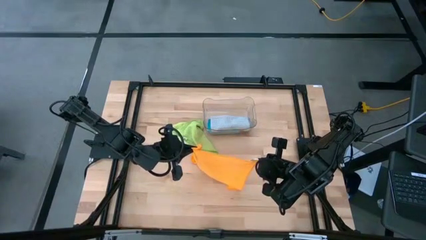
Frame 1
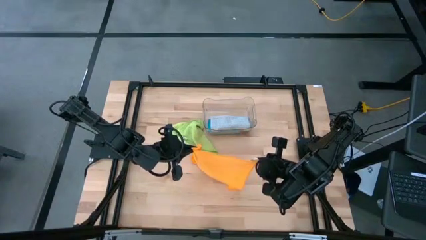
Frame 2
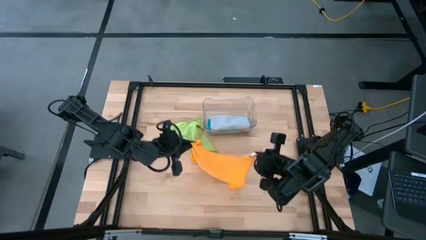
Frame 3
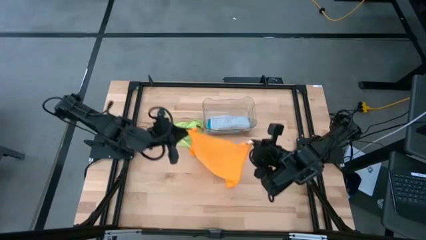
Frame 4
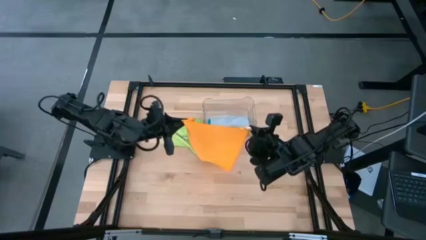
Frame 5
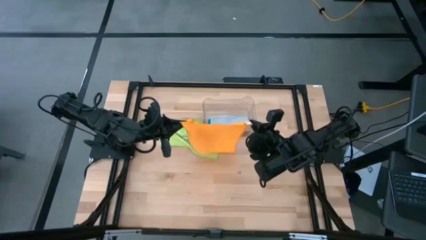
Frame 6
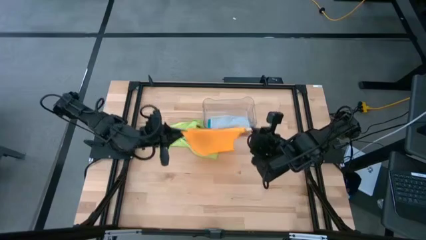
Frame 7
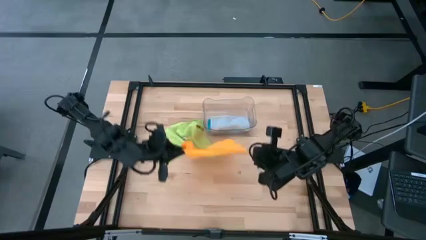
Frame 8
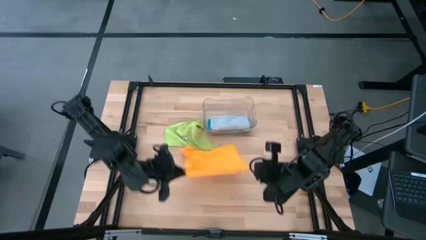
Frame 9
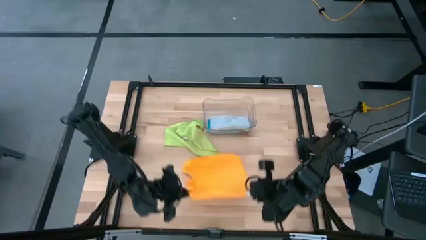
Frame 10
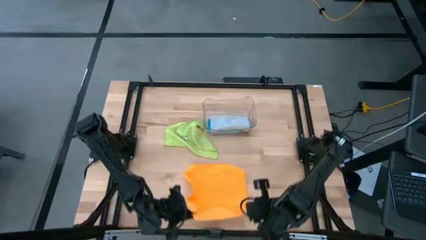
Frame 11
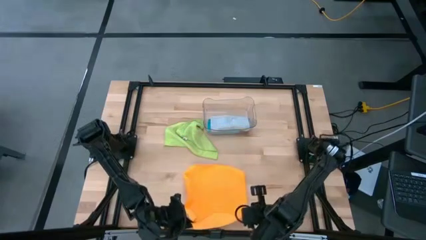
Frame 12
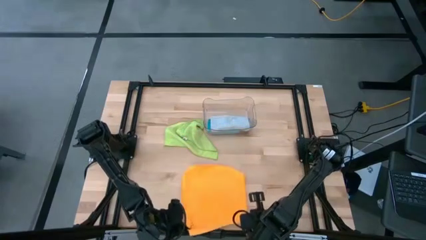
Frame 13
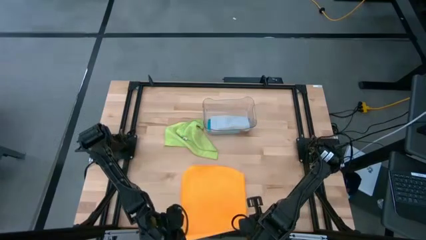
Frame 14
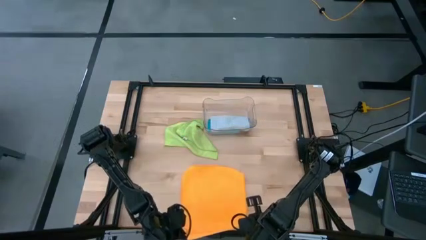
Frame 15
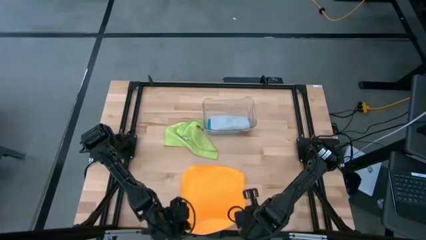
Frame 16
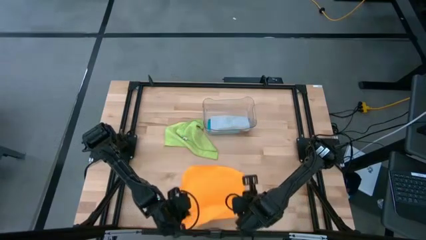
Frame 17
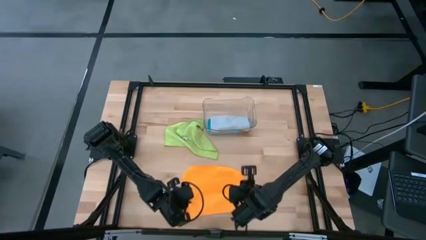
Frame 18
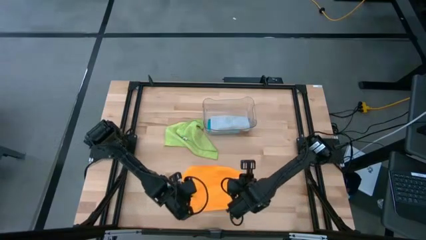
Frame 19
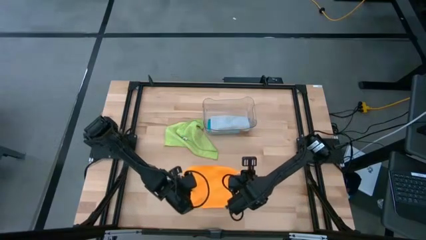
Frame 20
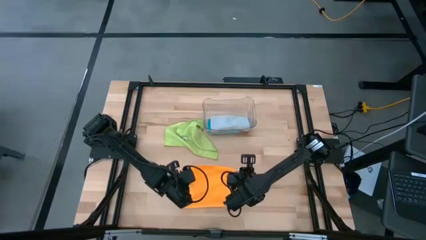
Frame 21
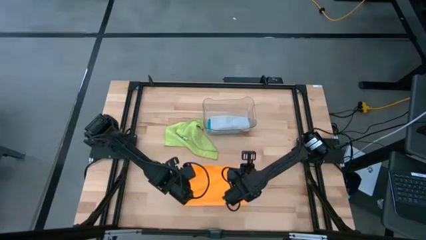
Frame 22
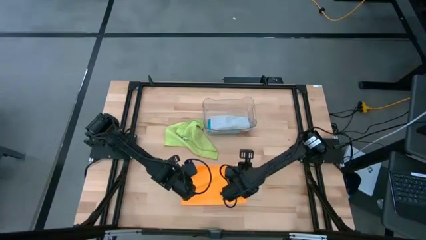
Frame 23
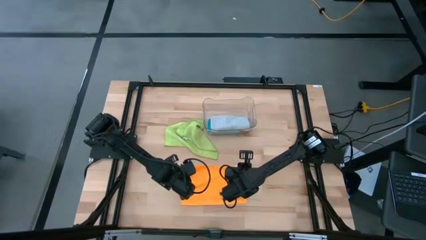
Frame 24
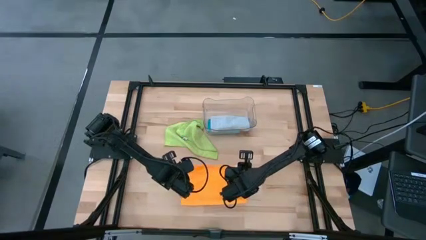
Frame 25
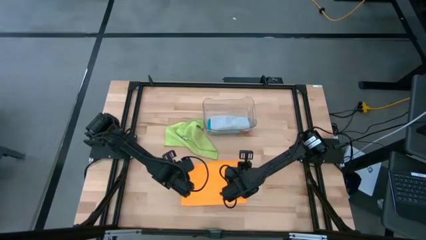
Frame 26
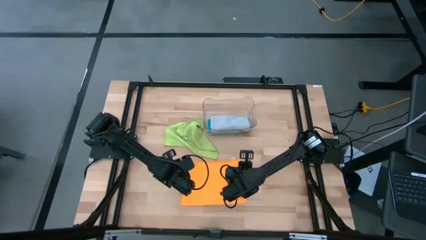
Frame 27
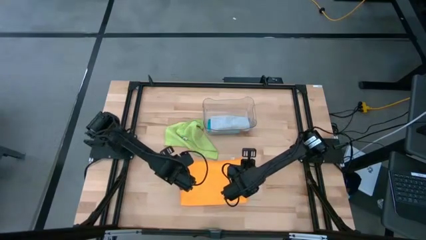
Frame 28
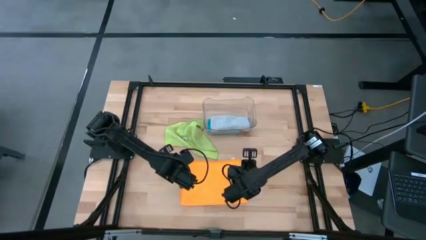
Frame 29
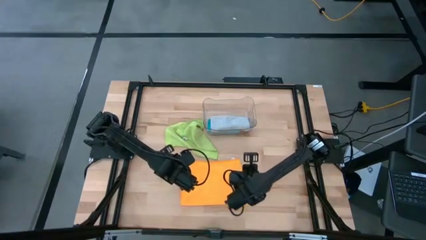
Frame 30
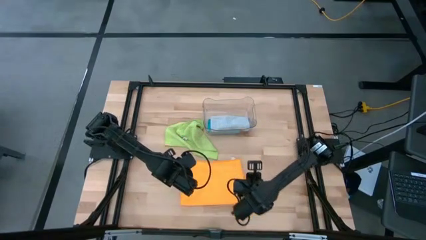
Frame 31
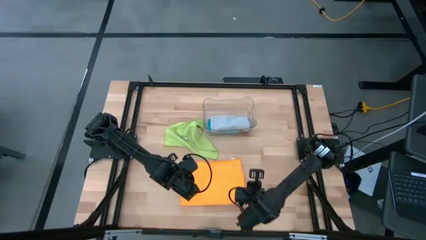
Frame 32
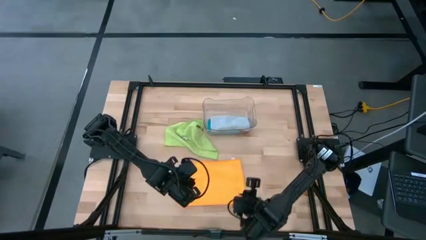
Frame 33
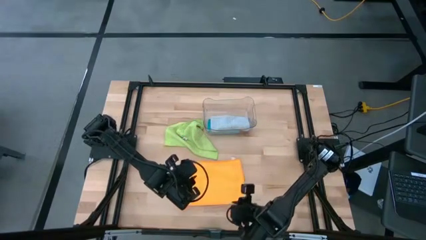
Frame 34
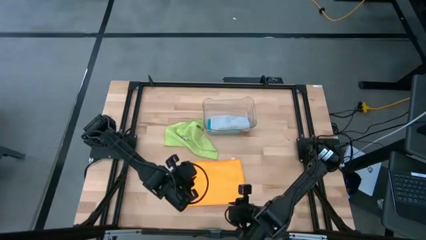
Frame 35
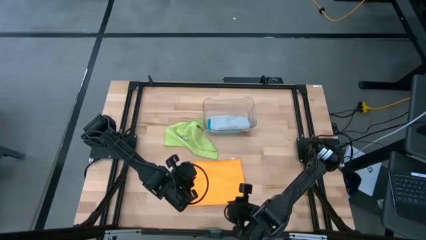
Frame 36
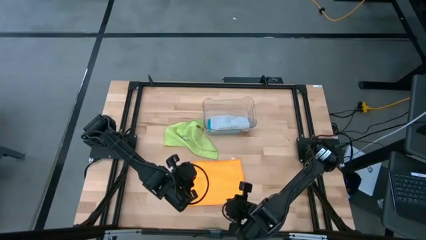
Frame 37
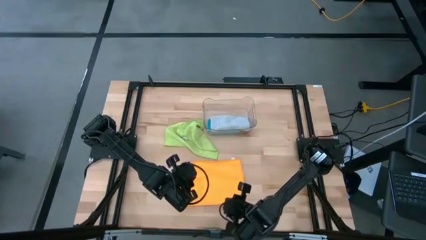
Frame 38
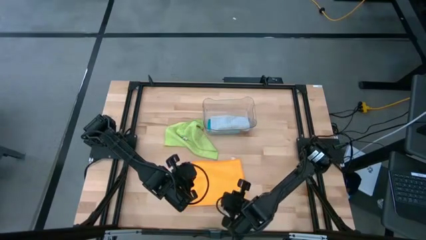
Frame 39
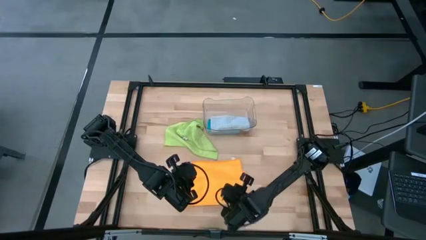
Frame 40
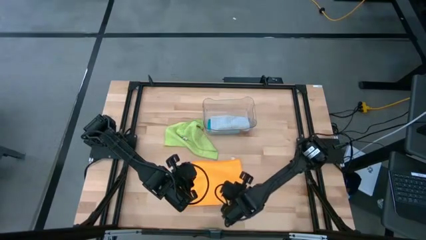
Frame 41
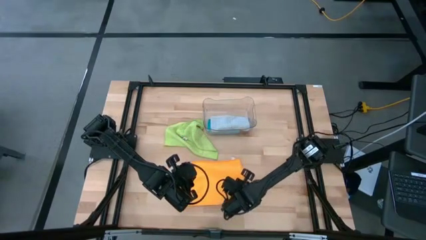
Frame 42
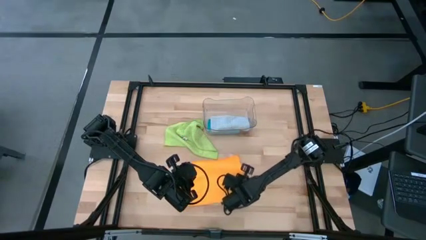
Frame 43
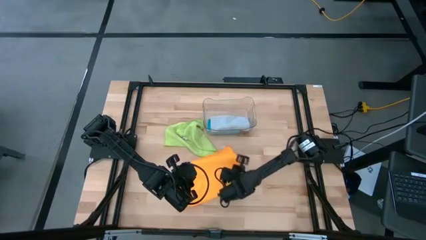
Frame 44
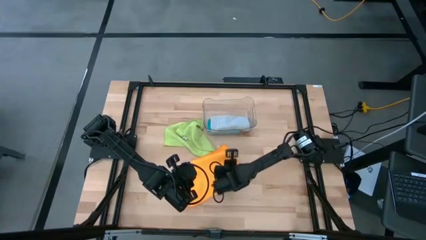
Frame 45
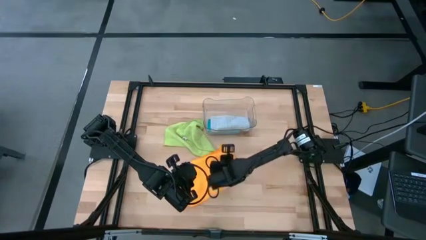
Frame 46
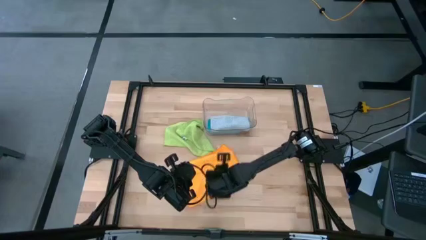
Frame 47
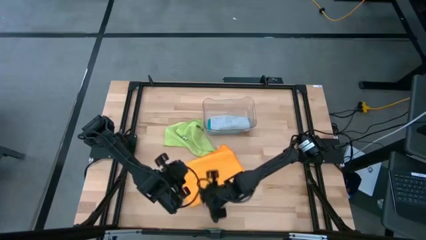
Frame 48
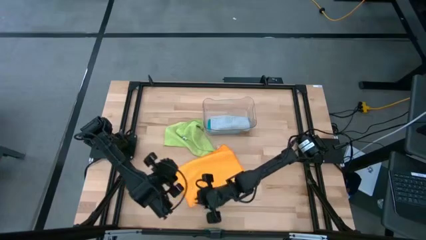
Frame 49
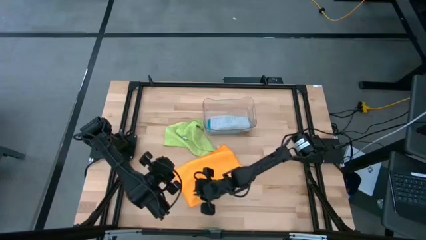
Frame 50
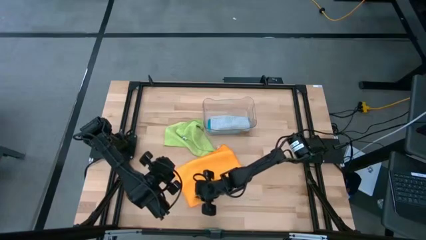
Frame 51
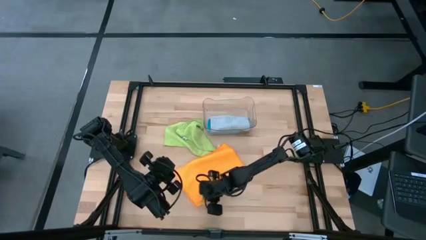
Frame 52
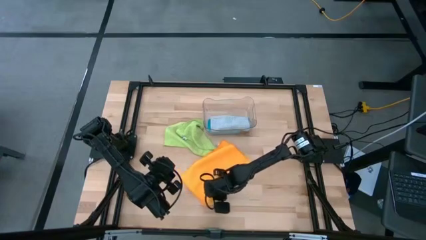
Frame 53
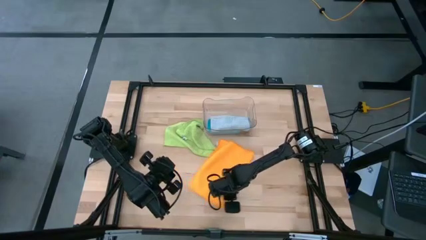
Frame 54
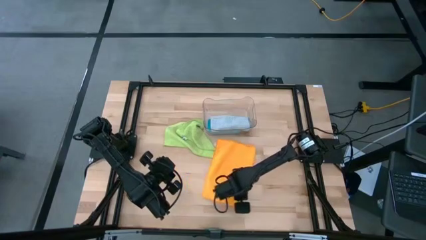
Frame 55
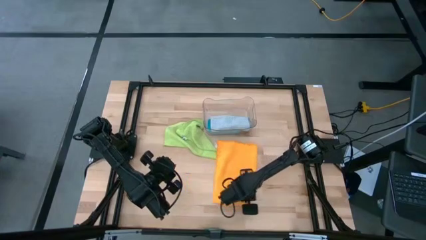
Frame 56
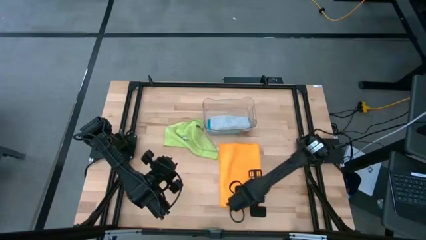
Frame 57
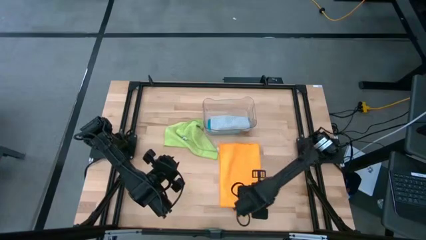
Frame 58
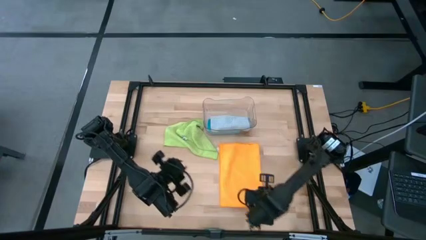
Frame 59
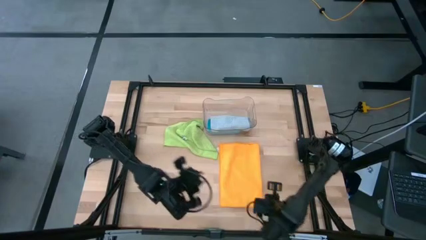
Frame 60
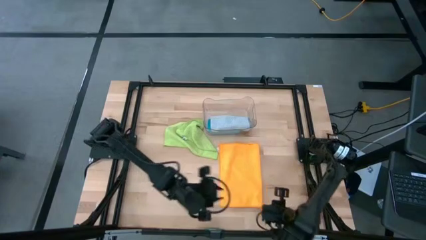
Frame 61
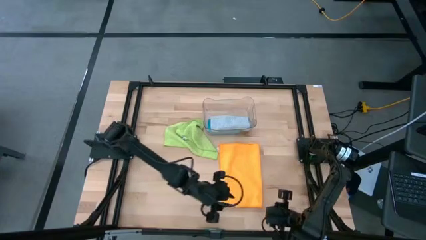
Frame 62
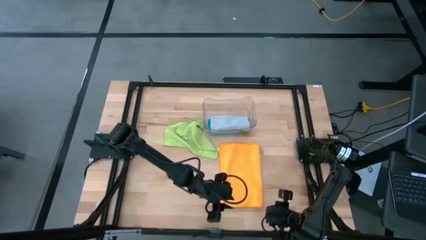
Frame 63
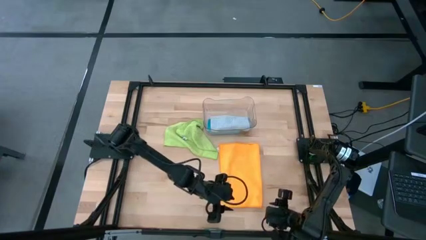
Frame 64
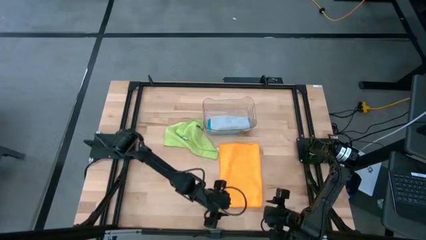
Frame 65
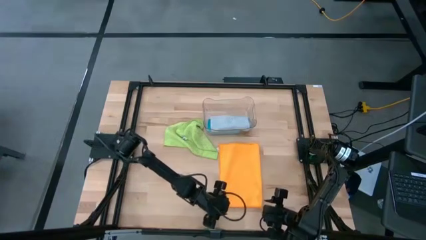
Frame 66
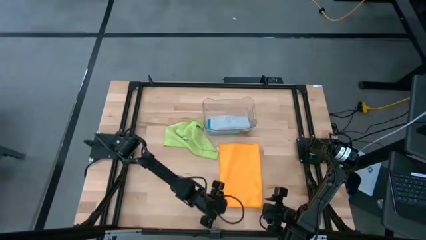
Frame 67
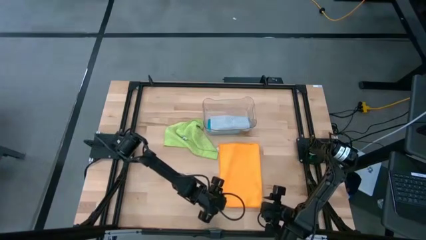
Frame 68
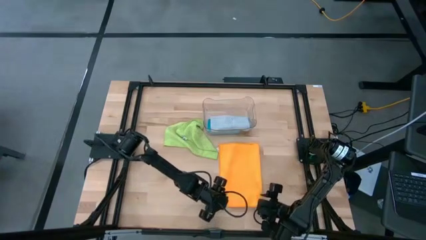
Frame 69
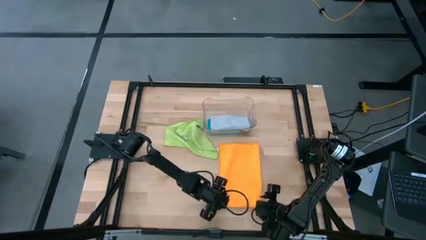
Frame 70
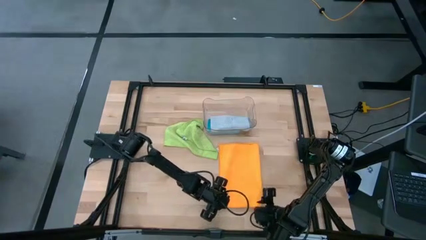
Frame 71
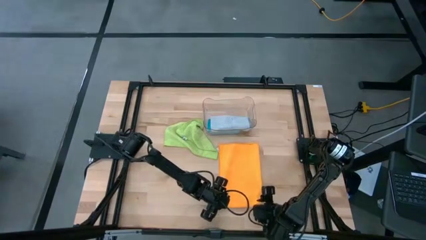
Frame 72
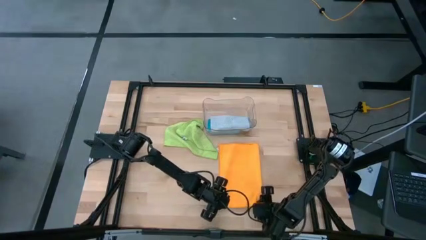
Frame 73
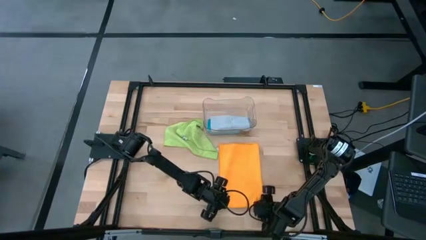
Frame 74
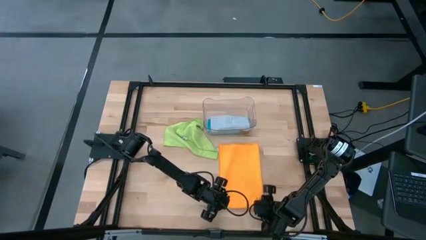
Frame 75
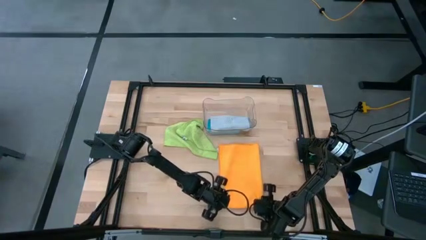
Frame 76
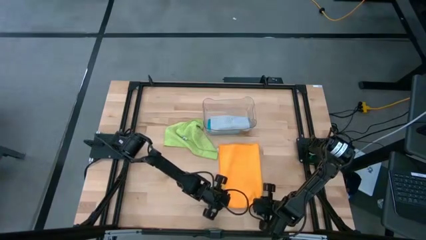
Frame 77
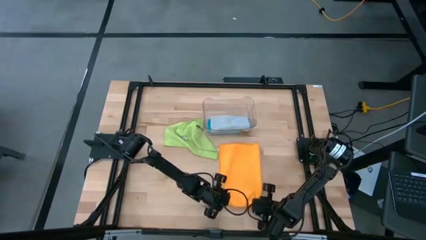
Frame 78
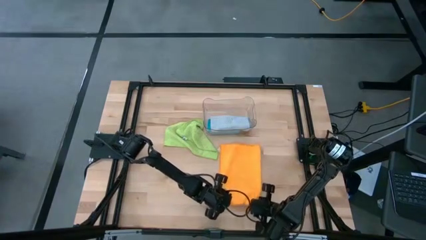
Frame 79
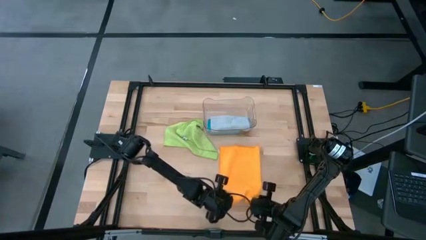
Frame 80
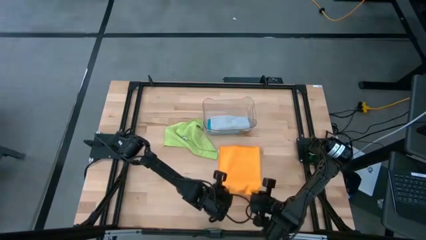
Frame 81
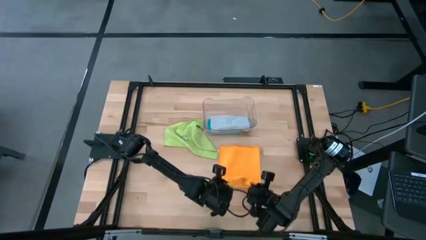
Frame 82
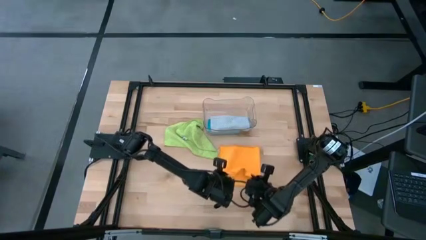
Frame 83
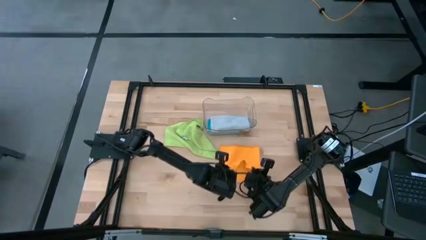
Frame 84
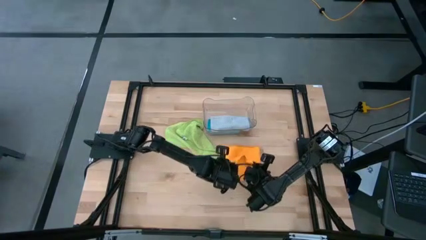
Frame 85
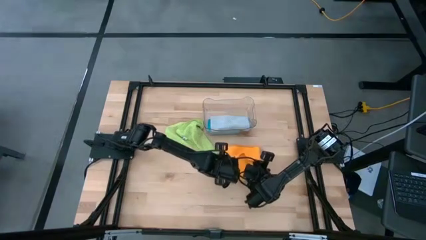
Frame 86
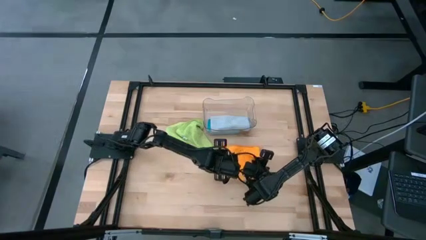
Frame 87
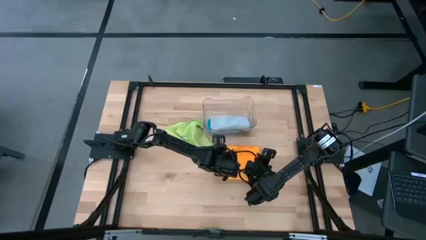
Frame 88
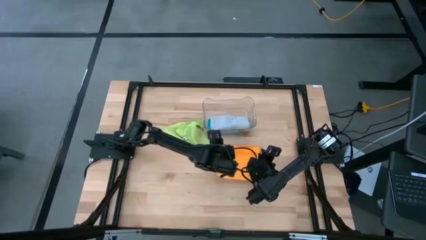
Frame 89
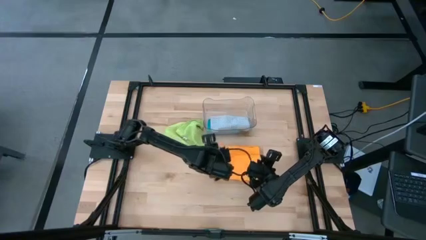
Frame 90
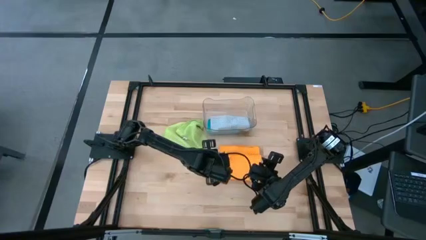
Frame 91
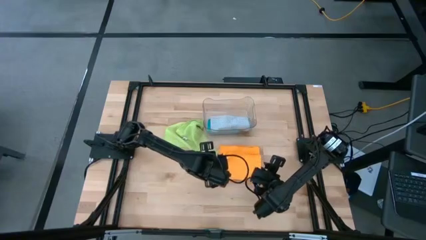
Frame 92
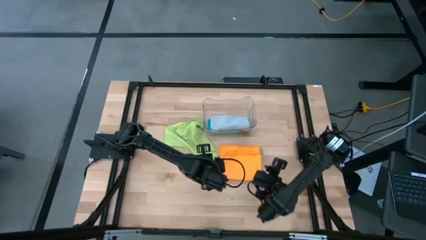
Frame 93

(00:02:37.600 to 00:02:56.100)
Task: Fold microfiber towels
Fold the yellow towel
